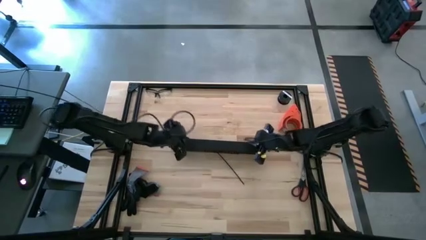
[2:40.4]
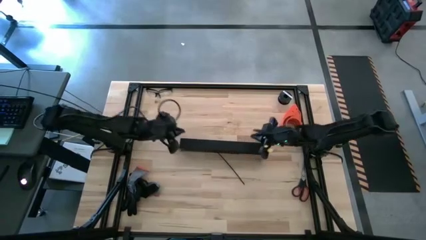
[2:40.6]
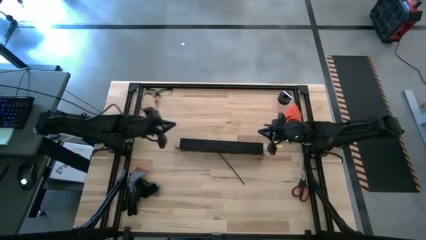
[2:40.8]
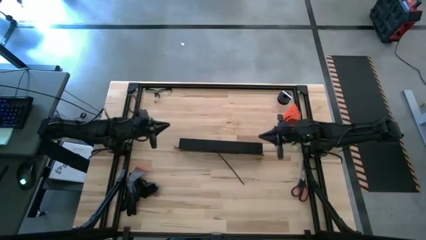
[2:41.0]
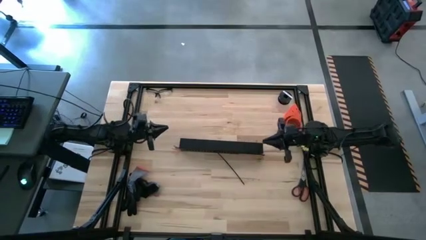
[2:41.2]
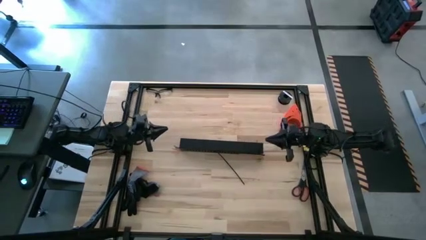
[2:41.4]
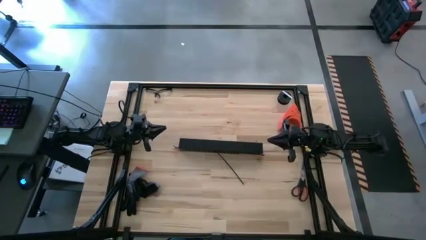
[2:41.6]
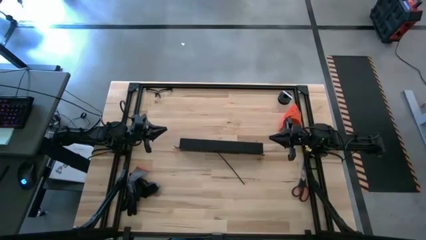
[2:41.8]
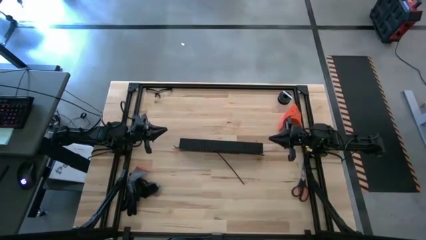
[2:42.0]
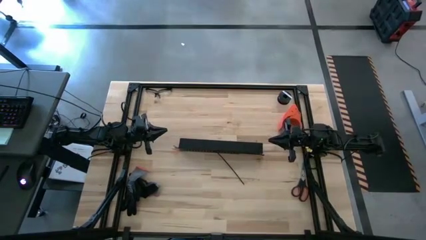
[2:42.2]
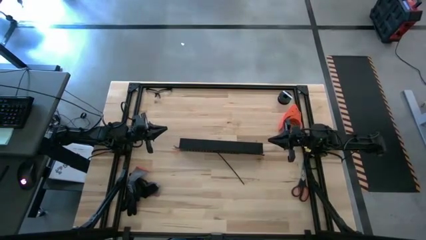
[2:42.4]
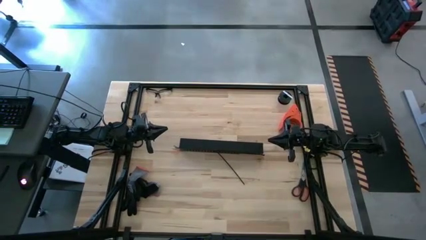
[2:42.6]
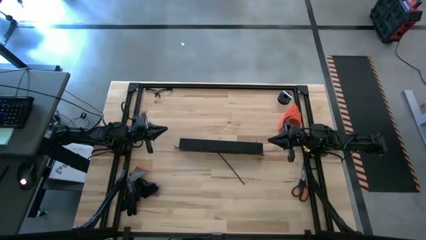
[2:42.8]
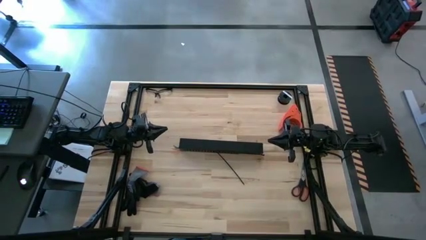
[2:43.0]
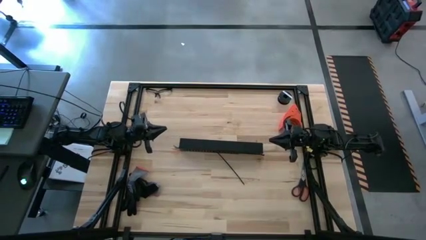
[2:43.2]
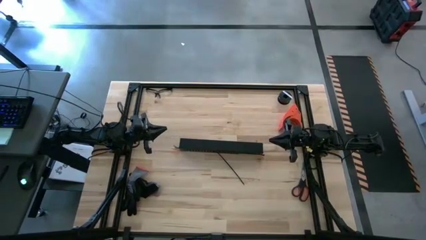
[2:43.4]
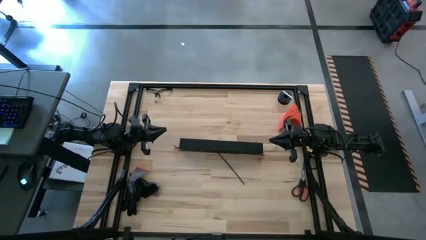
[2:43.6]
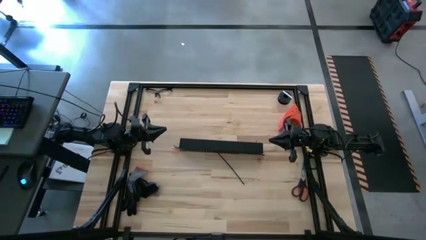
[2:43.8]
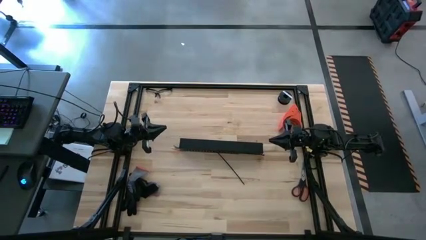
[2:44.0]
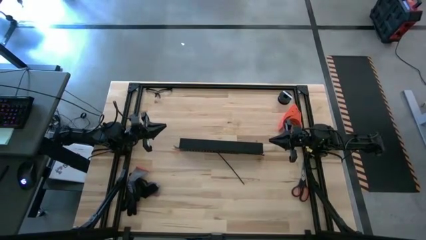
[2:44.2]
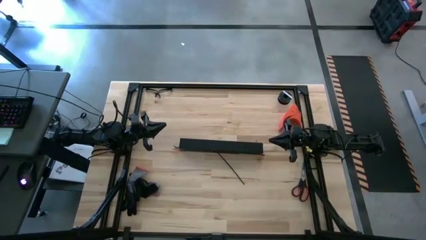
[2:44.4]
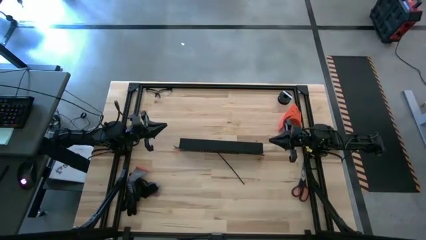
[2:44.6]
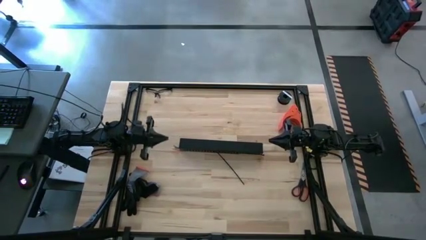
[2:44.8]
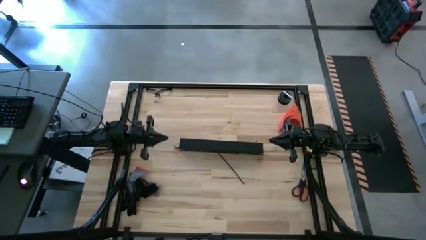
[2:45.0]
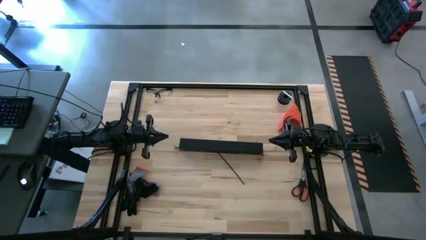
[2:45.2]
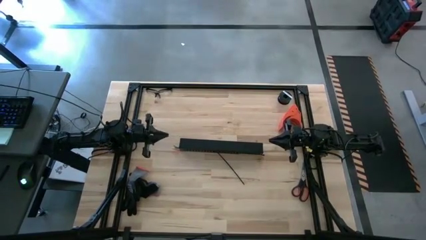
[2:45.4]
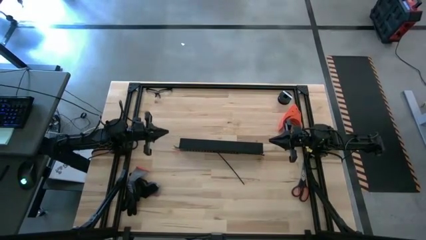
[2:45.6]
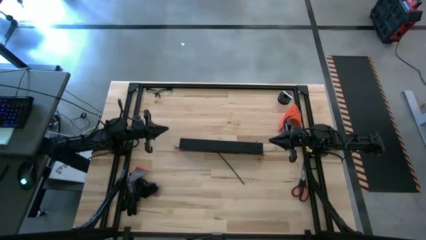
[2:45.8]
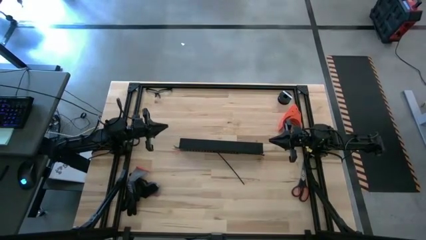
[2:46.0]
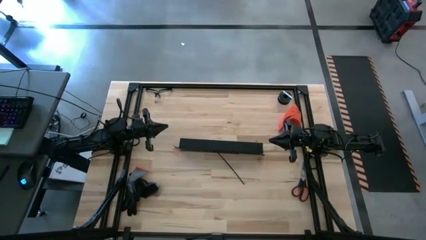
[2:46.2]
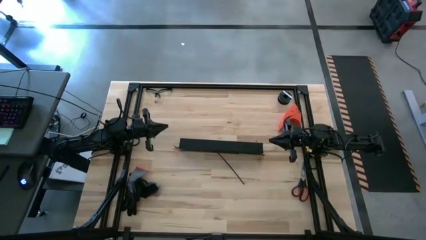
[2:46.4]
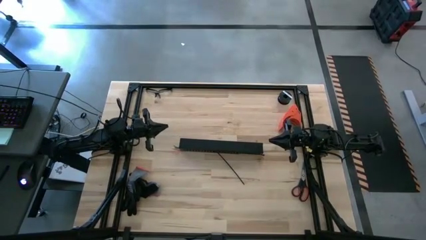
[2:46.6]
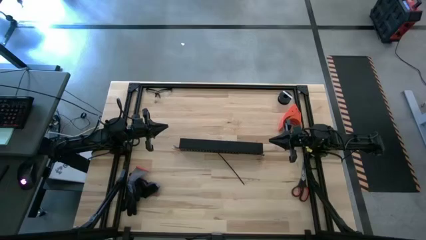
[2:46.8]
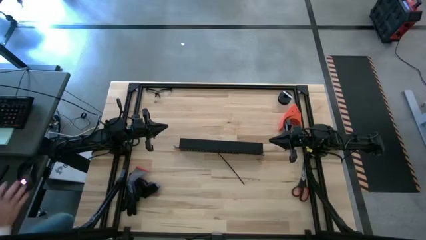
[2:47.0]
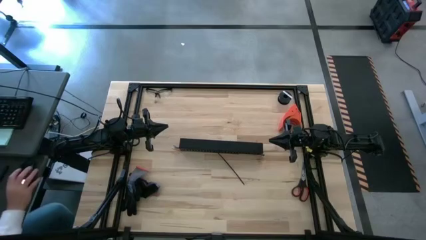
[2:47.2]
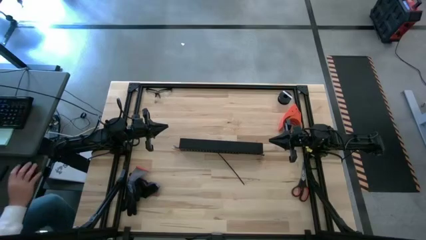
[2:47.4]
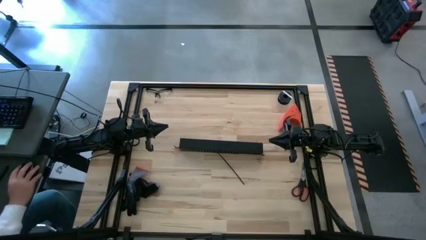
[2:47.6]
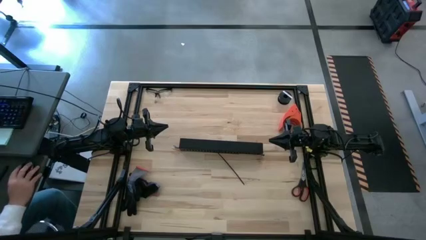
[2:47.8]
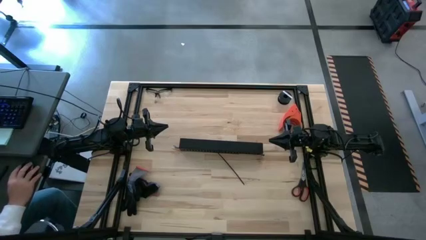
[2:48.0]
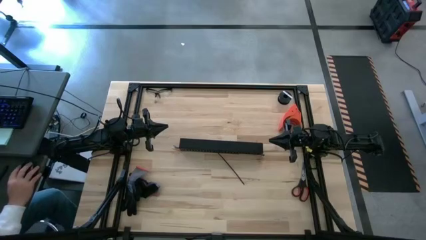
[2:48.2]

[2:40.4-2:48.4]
Task: Ziptie cables
Return to Home Position

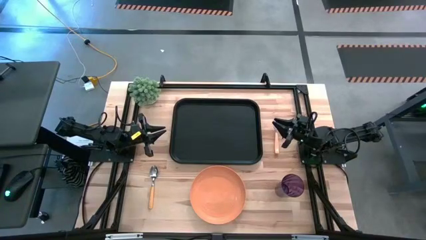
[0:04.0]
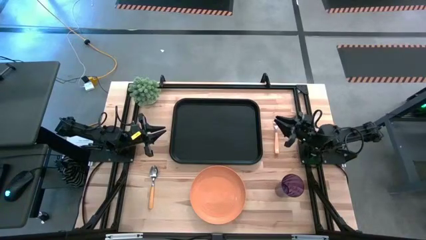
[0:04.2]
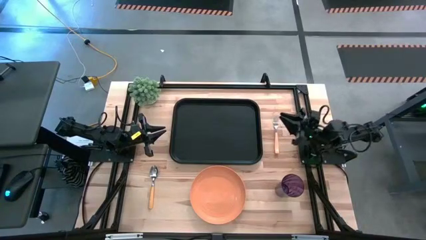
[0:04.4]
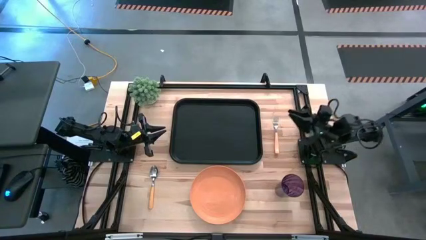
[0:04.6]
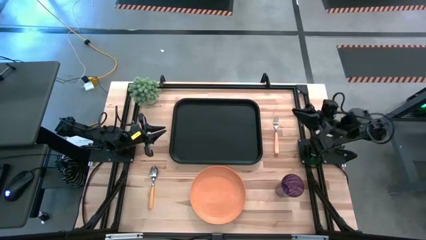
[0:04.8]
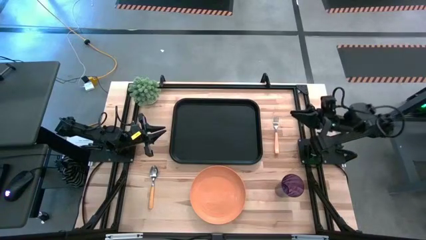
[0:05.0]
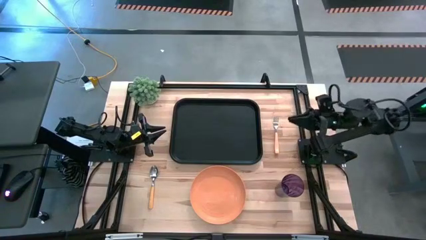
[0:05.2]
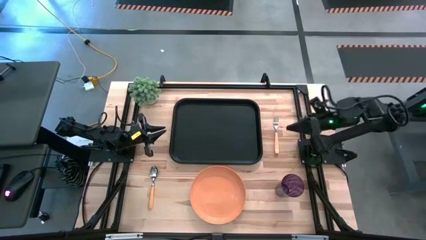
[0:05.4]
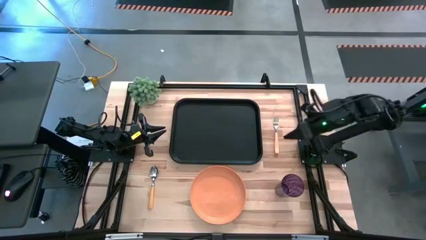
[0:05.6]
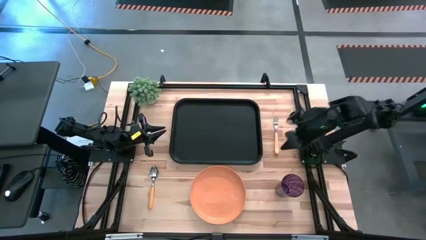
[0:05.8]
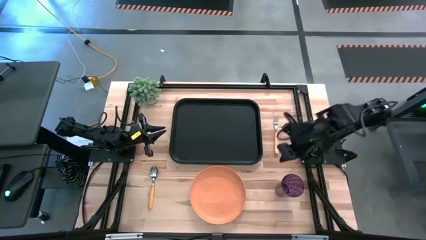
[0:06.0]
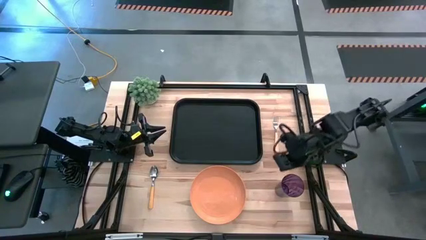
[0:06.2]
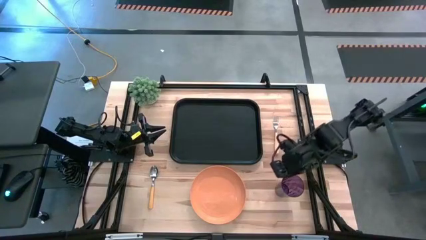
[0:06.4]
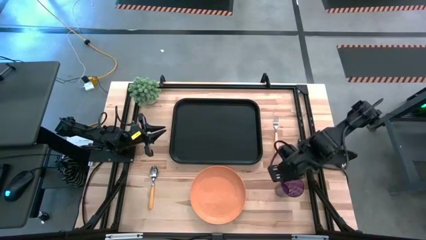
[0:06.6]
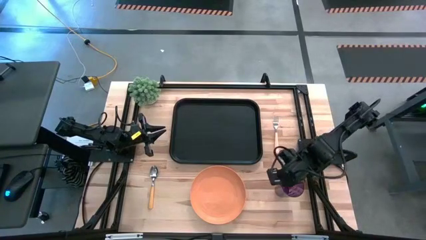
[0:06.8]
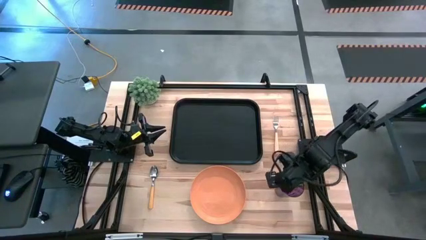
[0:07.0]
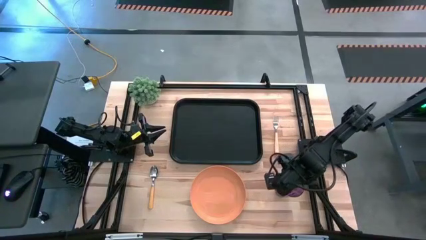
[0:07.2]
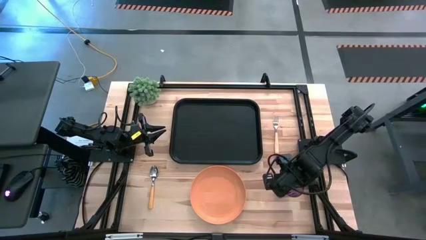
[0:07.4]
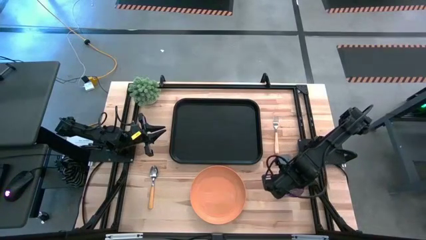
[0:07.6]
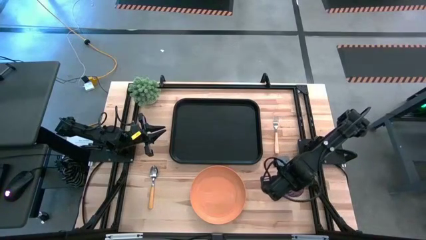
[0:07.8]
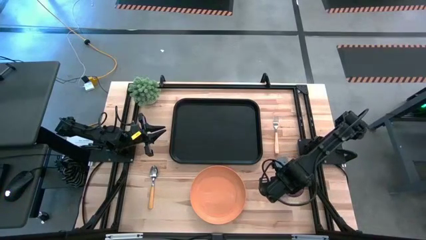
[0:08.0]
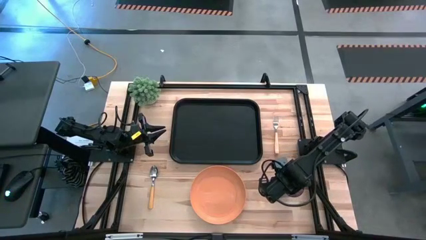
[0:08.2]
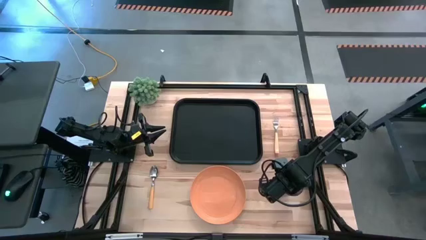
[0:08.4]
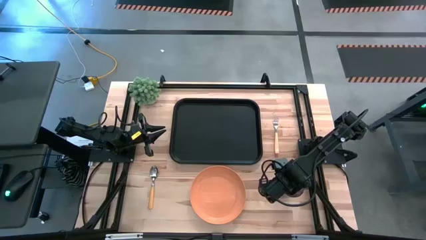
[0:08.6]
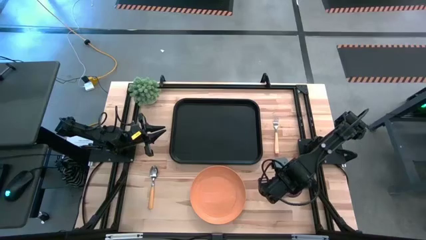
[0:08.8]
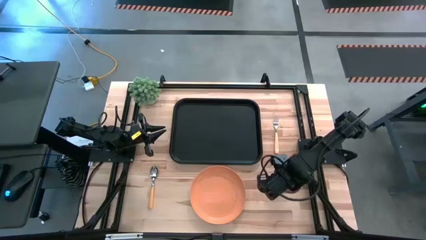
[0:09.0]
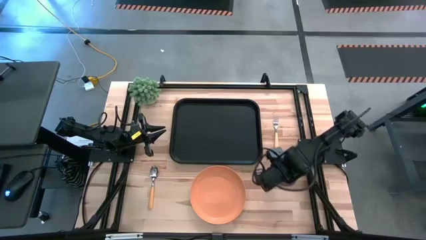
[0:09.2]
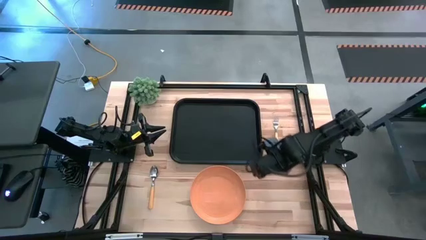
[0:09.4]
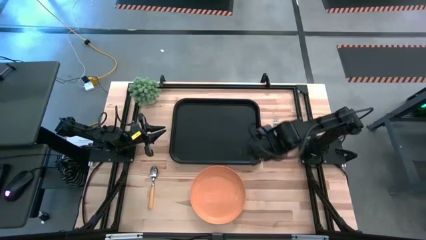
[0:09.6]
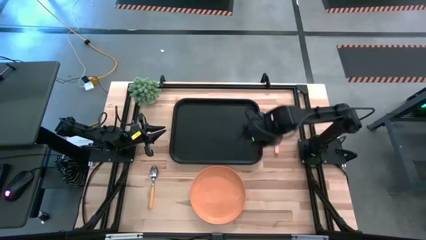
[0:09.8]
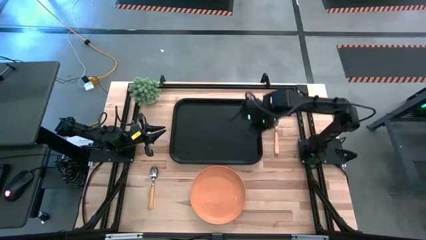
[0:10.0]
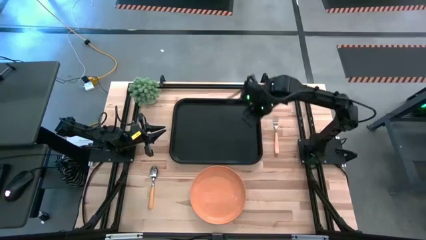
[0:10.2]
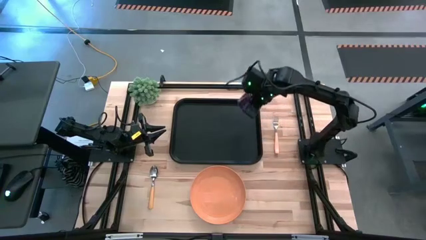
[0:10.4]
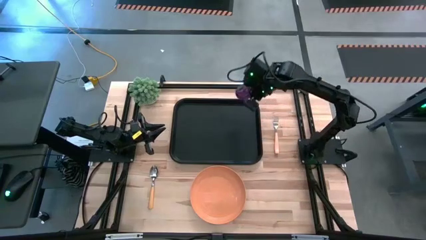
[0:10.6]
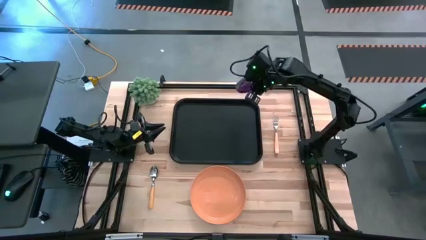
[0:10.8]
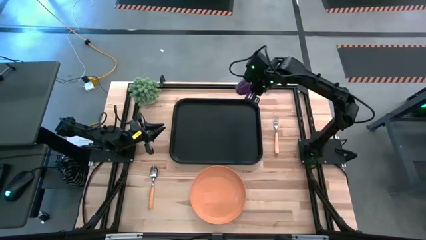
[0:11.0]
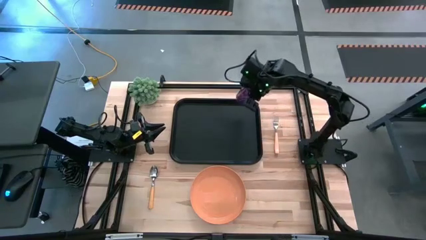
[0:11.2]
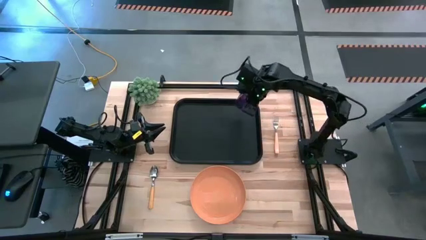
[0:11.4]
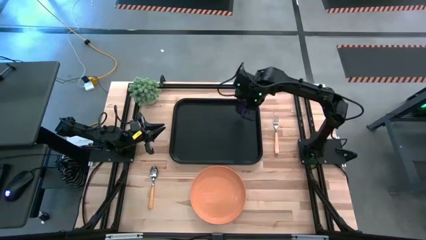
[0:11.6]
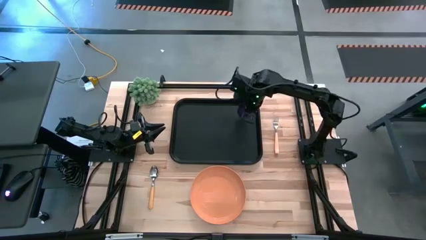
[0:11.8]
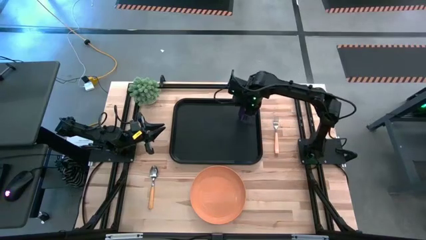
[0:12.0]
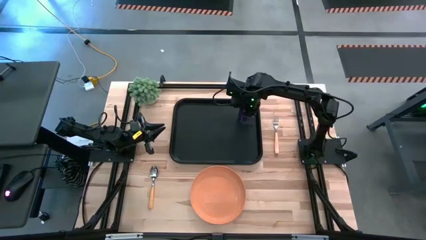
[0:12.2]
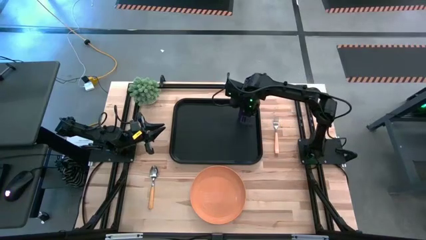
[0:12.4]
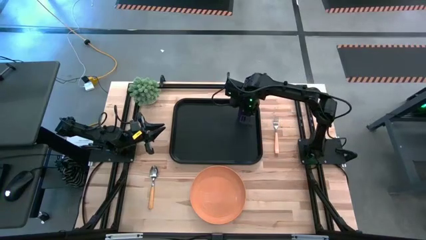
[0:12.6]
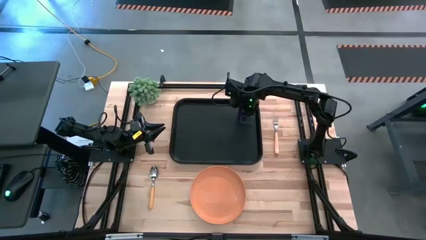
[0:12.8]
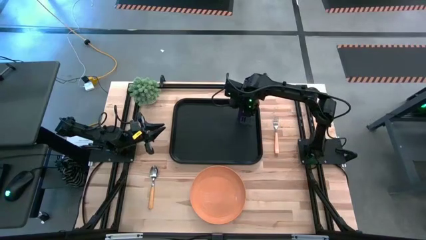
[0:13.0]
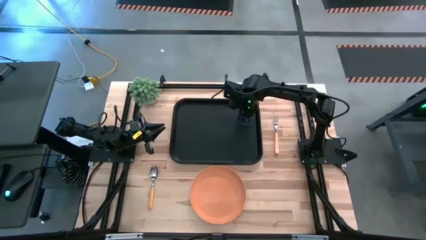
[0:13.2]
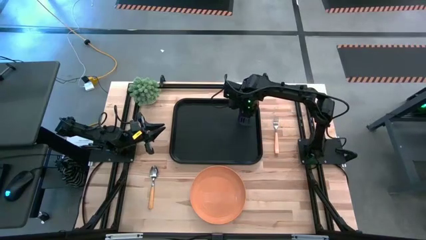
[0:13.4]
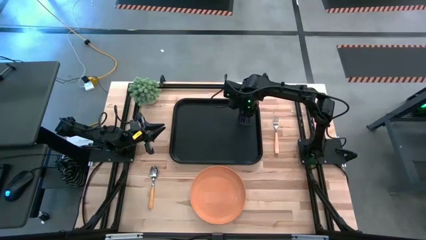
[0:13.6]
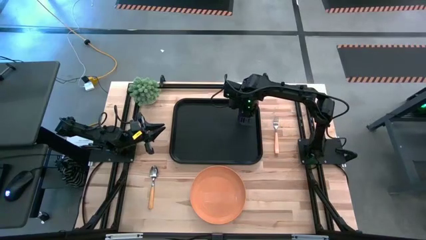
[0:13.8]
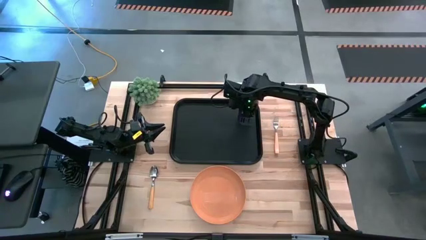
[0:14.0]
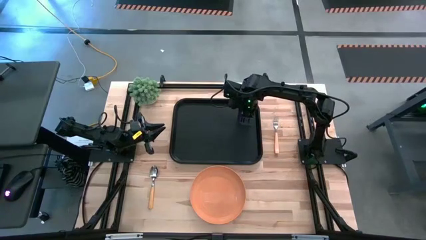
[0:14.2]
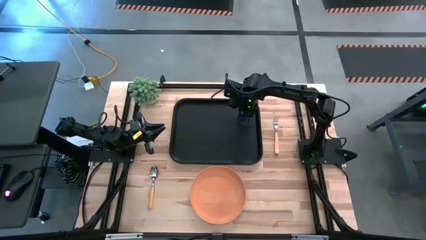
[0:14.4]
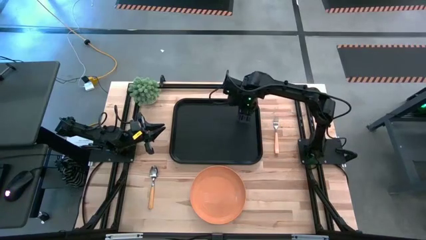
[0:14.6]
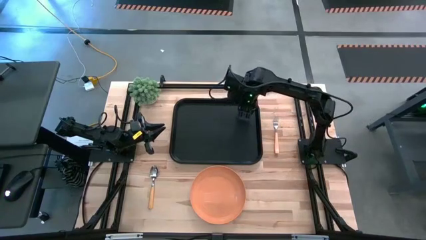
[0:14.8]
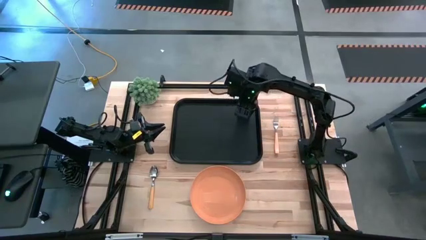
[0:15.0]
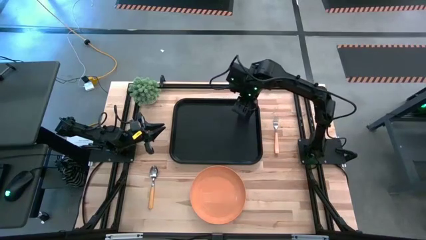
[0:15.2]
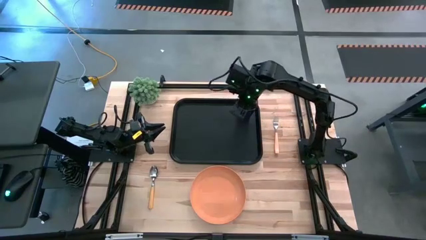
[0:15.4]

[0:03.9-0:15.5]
Task: Pick and place plate/cup/fork/spoon on tray
Put the violet glass cup on the top right of the black tray
